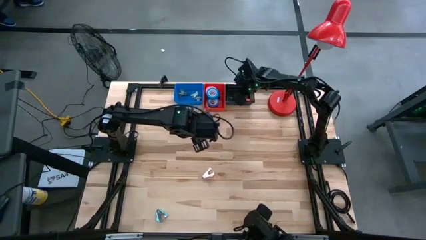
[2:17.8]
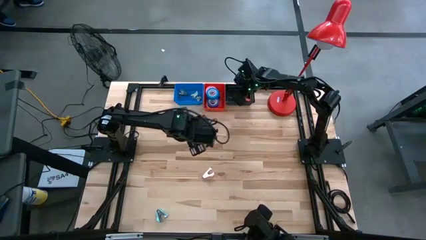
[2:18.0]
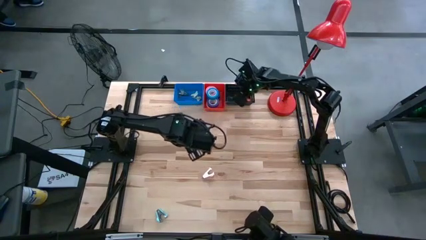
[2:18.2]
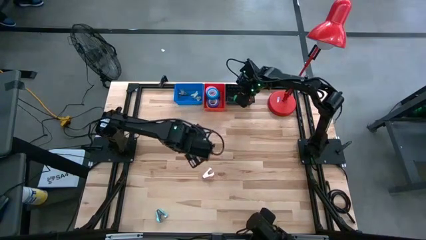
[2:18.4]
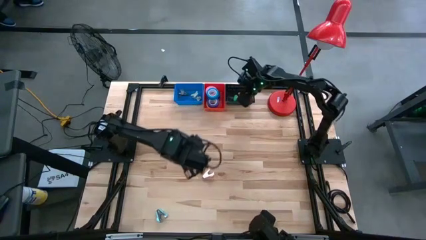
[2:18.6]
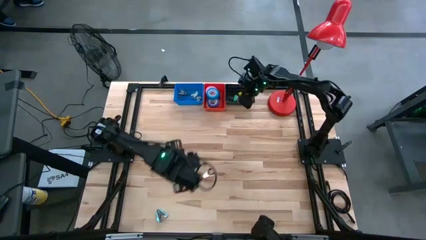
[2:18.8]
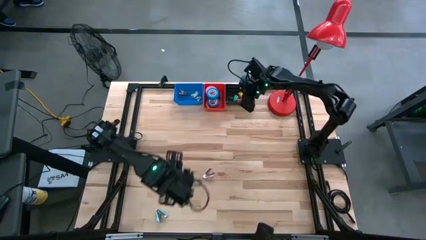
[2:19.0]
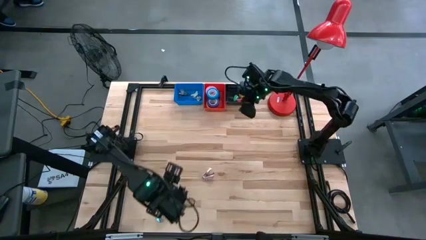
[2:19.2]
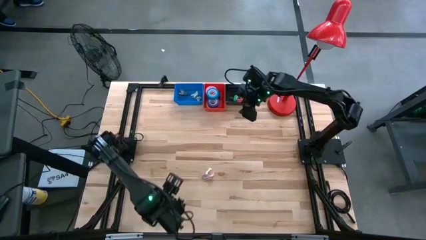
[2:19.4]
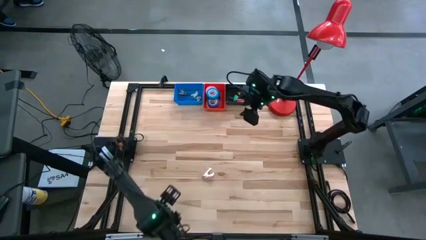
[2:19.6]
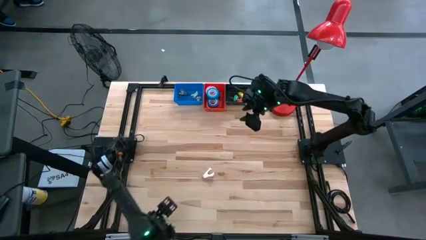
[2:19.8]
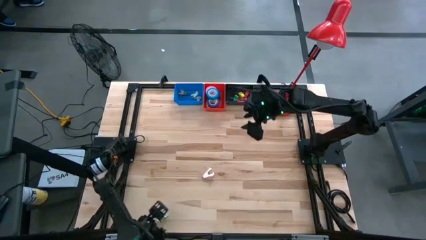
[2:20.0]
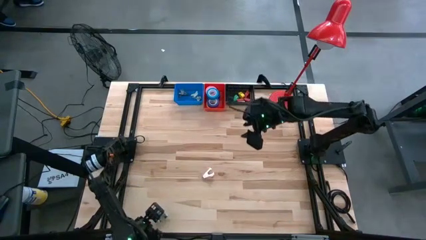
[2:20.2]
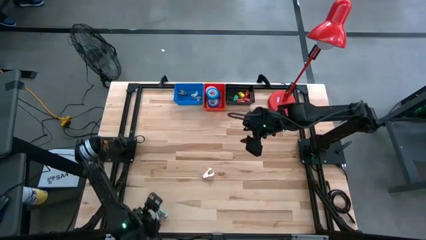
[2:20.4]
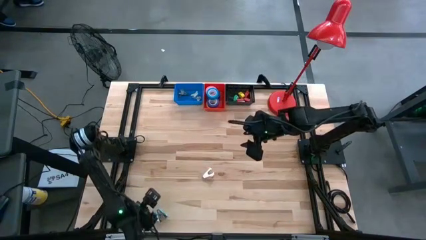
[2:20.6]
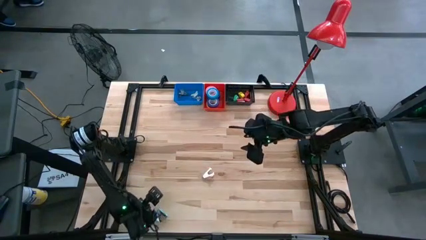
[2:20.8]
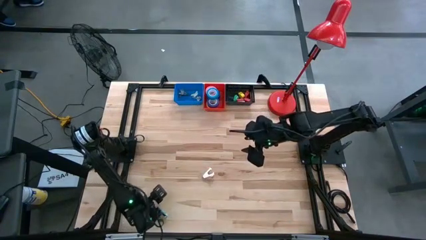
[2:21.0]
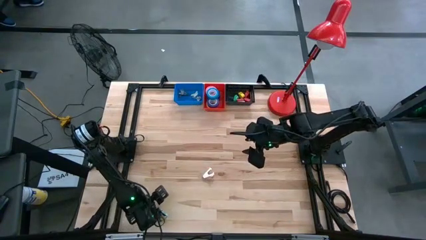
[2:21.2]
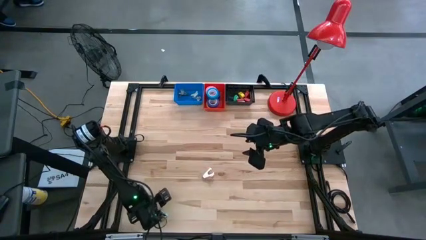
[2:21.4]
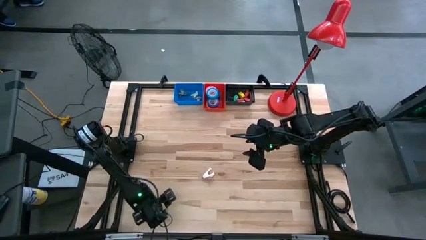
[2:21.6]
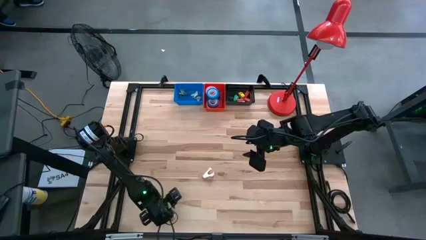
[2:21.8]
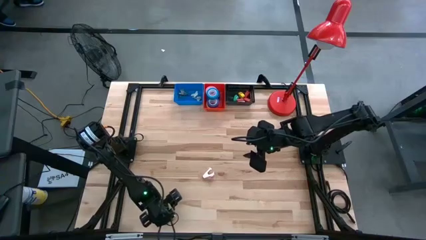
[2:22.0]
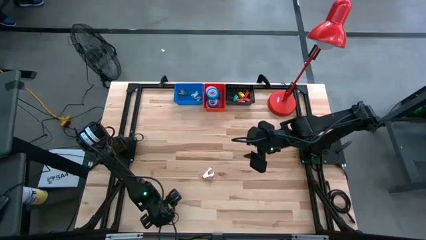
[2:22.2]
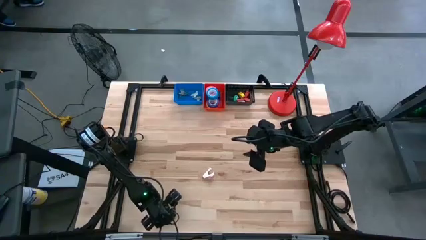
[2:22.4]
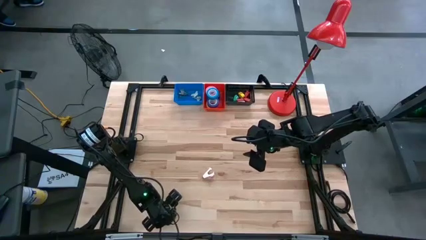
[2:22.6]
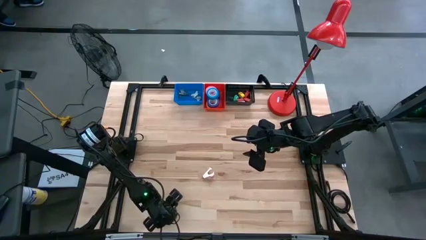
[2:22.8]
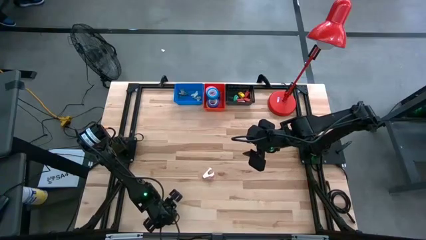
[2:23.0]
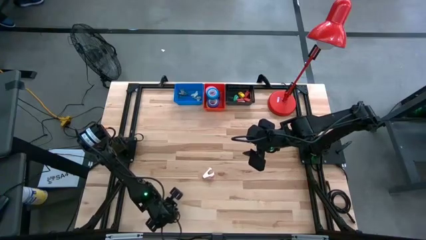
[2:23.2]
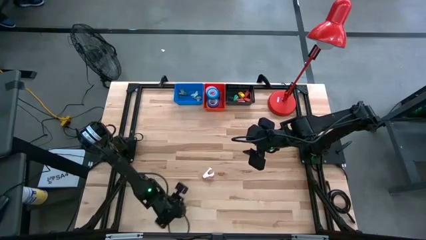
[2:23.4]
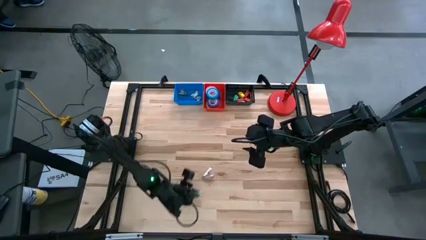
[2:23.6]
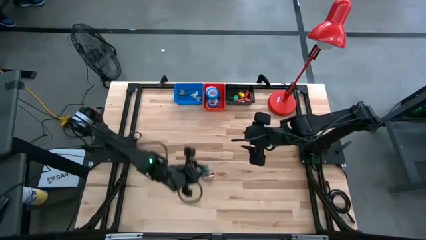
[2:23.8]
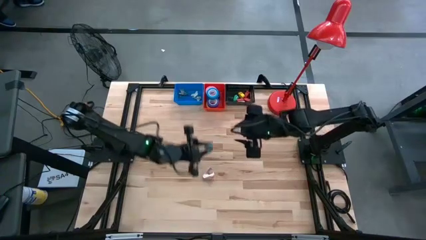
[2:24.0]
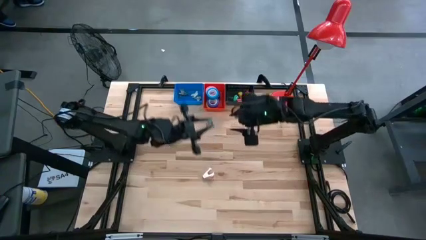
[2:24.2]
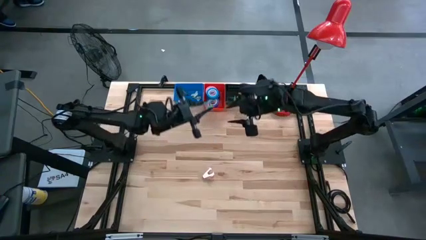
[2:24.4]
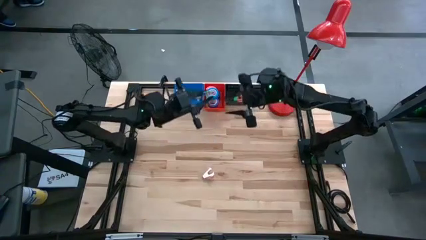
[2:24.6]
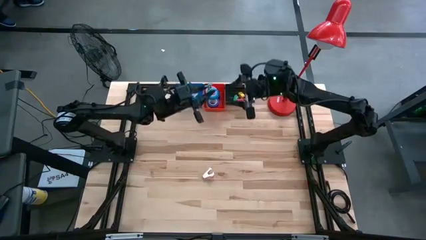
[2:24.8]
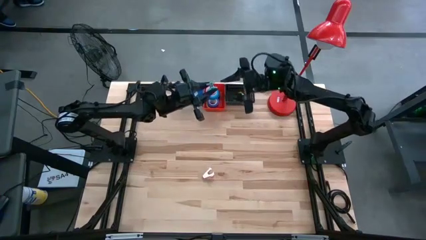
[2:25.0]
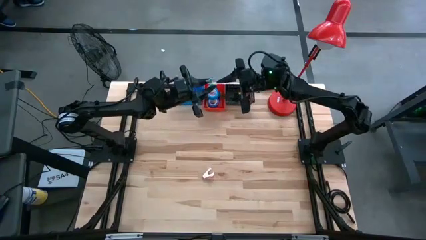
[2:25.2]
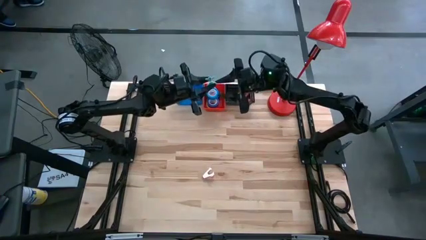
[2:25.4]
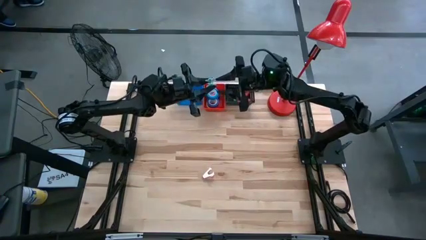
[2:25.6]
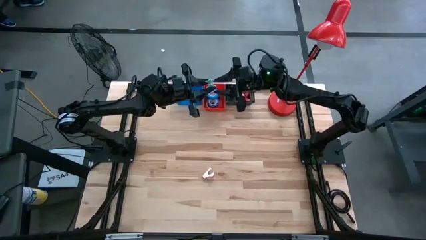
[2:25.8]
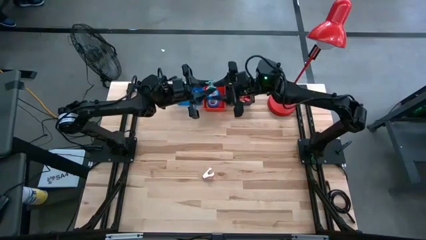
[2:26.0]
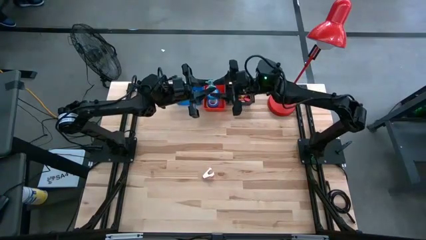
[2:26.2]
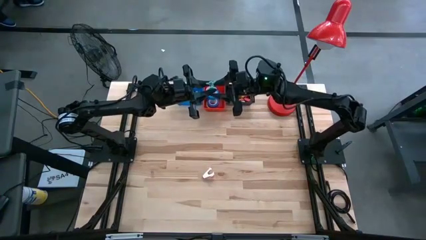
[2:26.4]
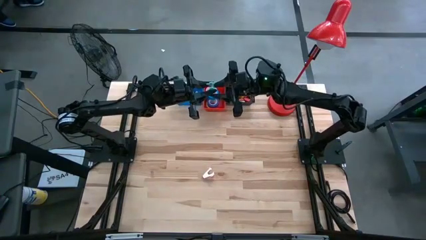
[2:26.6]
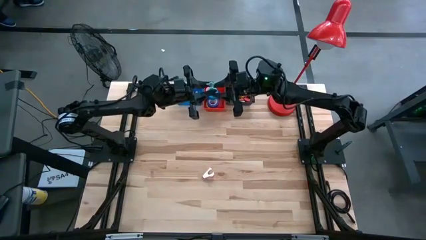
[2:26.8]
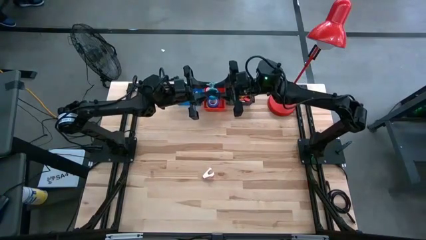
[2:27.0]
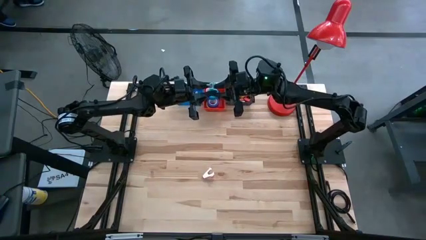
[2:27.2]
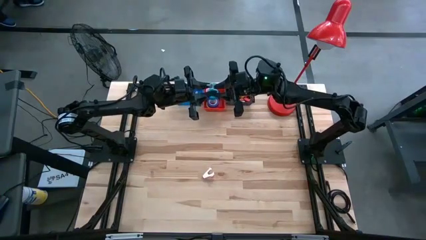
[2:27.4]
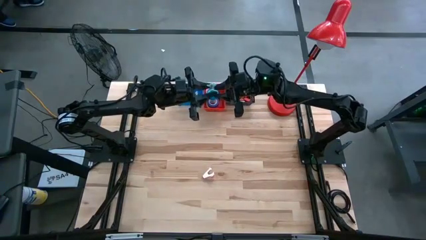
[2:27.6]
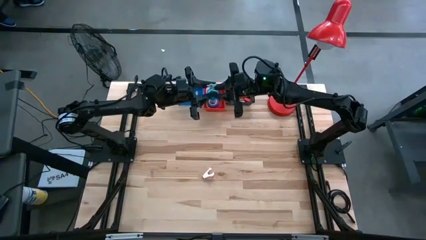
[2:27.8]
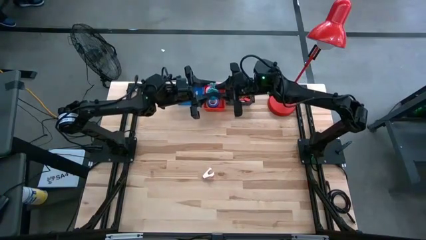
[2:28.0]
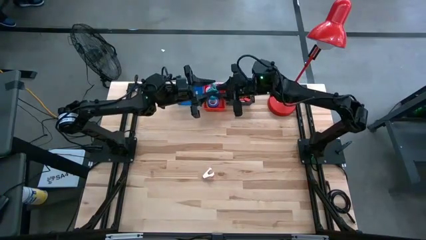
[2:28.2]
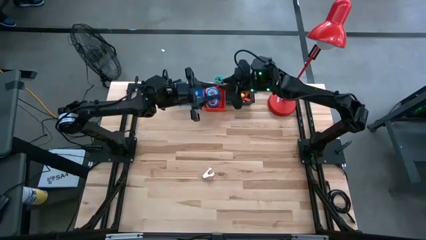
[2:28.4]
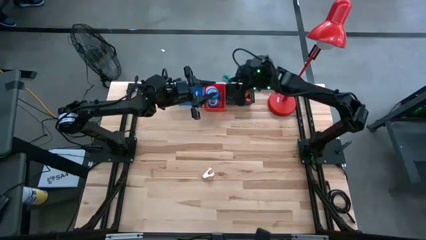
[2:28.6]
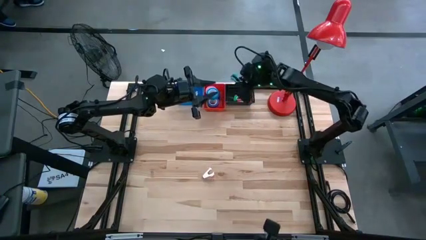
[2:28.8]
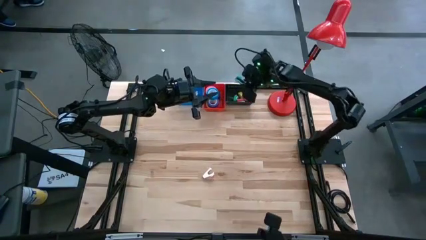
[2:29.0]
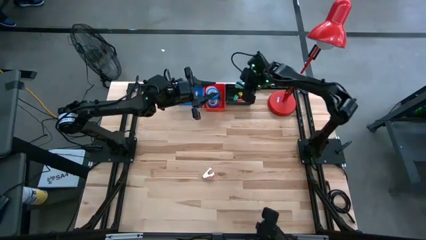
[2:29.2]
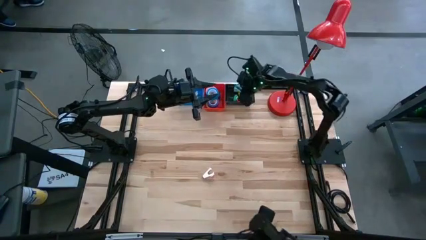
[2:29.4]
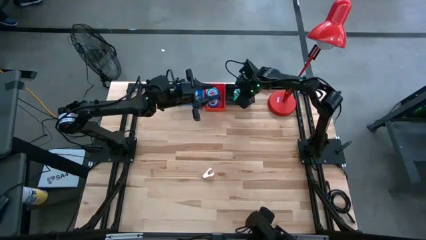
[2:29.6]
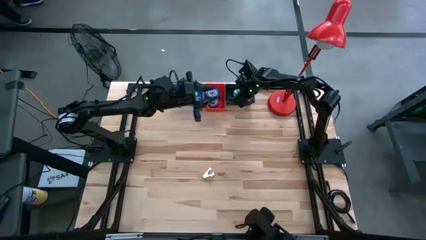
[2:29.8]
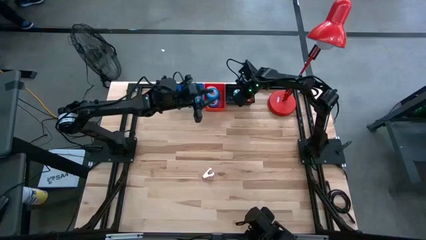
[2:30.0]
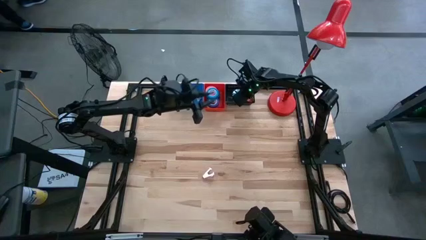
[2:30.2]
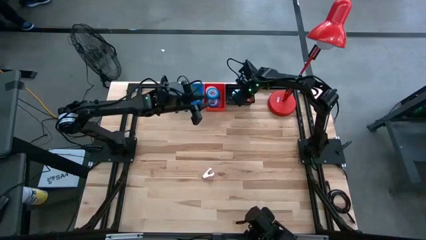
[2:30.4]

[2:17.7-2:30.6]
Task: Pick and place Stapler, Stapler remover, tape
Put the blue staple remover into the blue basket

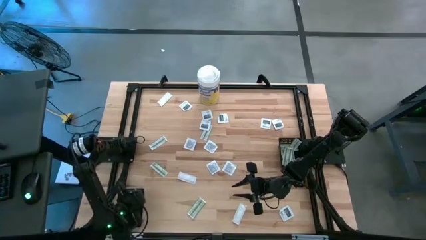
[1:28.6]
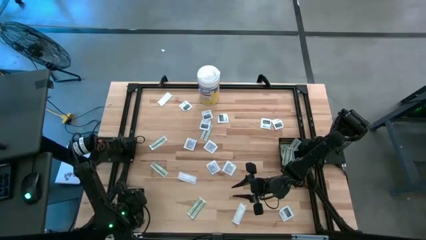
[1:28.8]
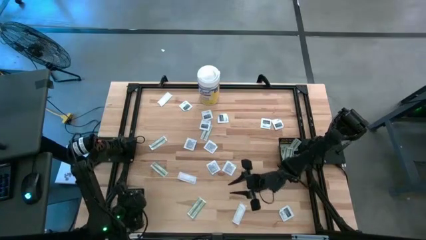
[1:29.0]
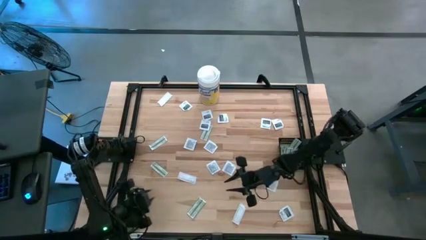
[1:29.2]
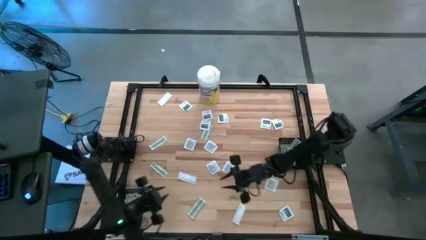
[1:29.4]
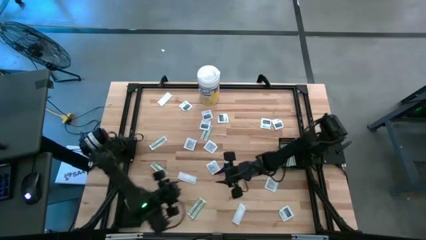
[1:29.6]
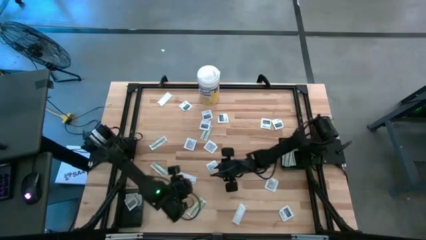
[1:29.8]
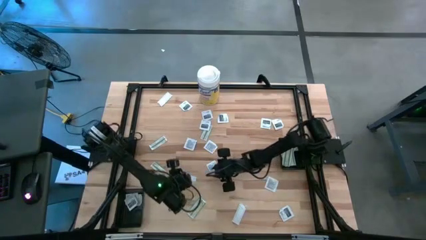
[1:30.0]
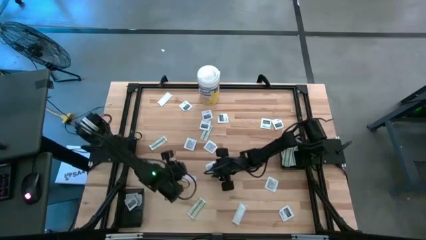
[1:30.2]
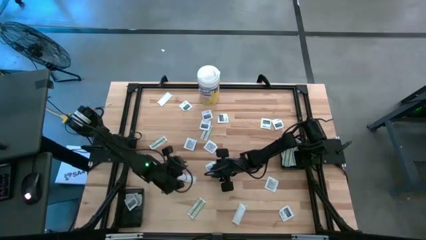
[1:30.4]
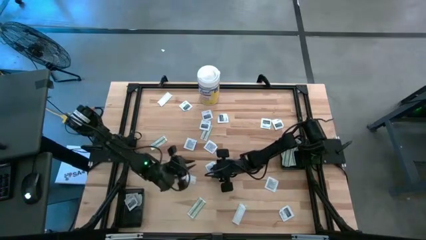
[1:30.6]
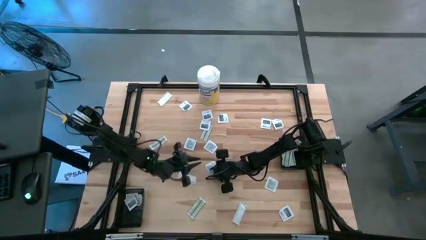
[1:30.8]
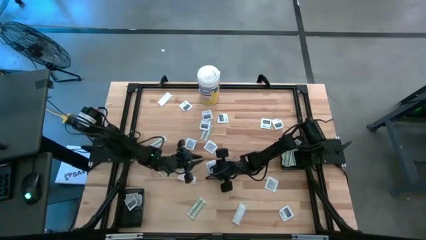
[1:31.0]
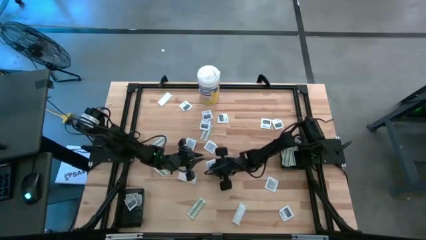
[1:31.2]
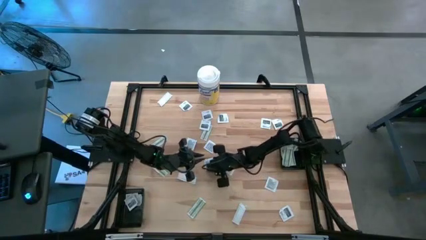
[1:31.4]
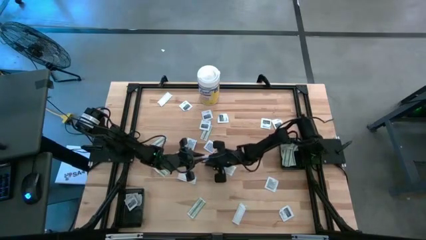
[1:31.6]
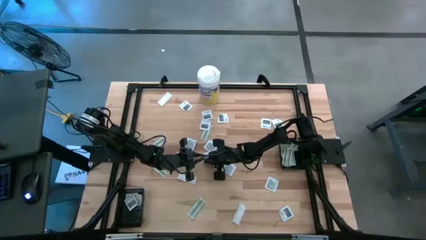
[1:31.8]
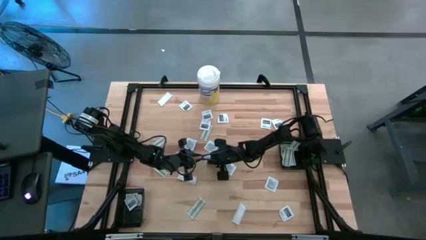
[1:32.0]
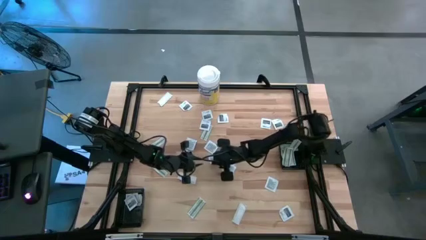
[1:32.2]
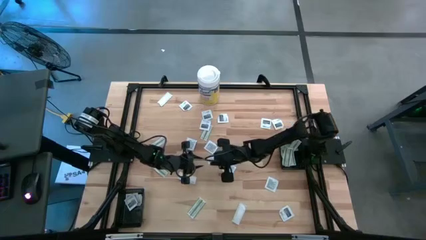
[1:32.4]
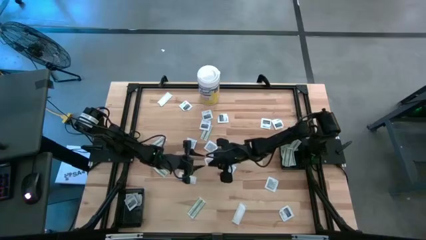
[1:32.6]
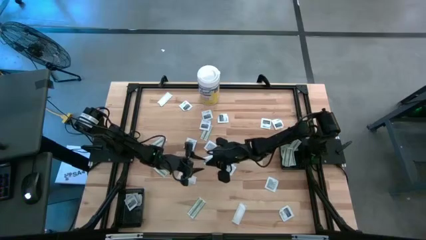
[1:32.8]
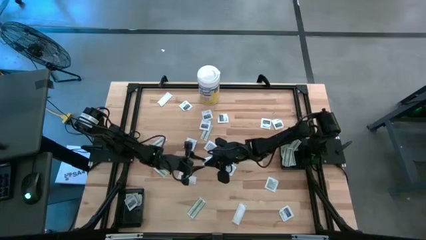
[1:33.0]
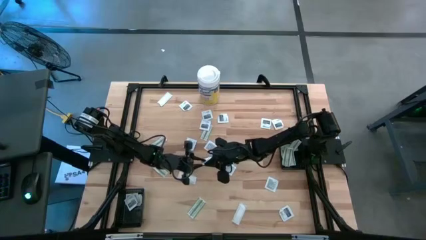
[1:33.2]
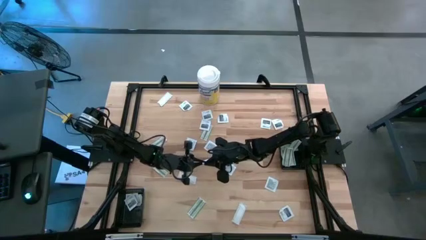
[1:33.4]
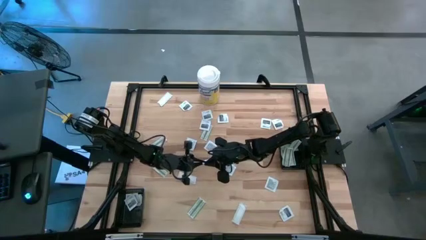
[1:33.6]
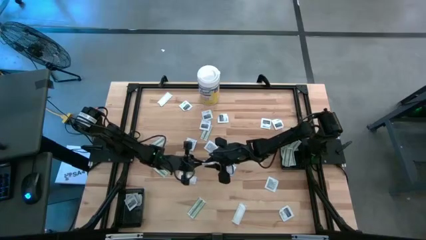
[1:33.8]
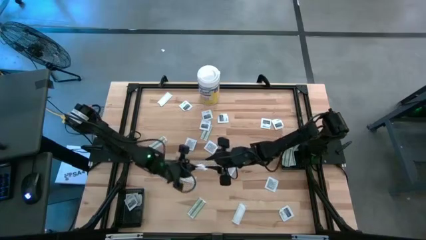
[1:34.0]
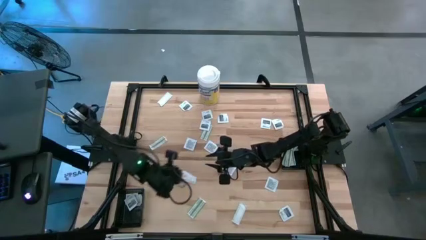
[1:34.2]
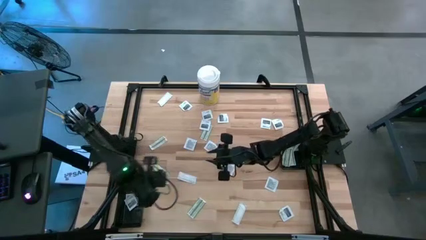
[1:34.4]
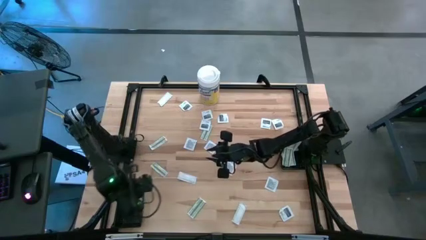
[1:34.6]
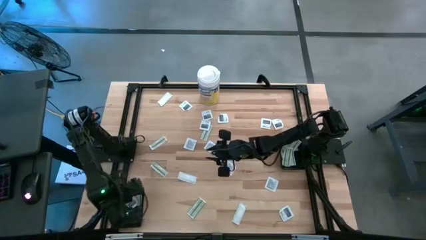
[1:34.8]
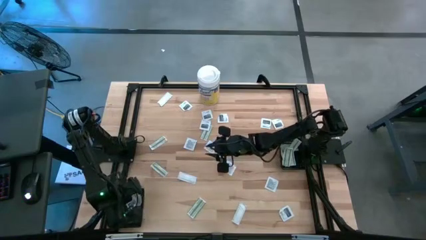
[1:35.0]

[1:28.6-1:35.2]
Task: Pick & Place First Aid Supplies
Put the white towelette into the left black bin
